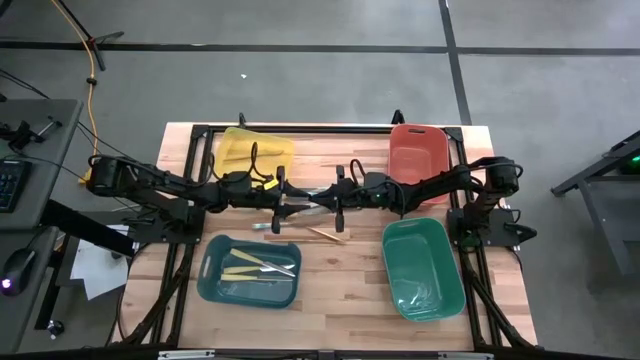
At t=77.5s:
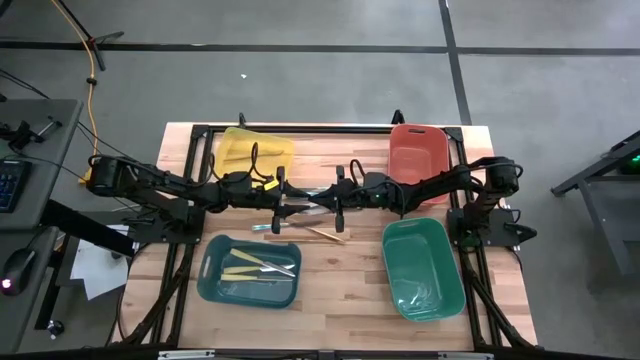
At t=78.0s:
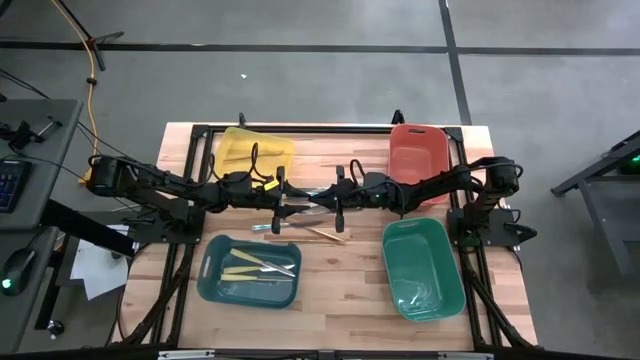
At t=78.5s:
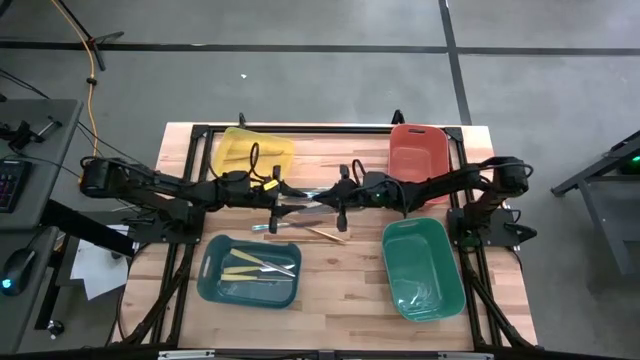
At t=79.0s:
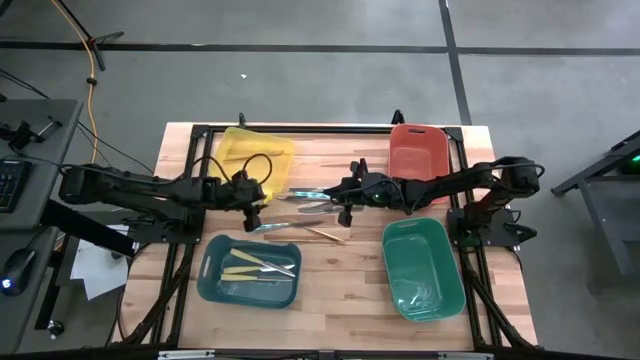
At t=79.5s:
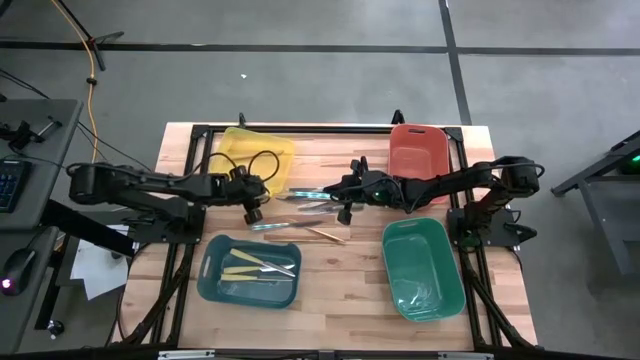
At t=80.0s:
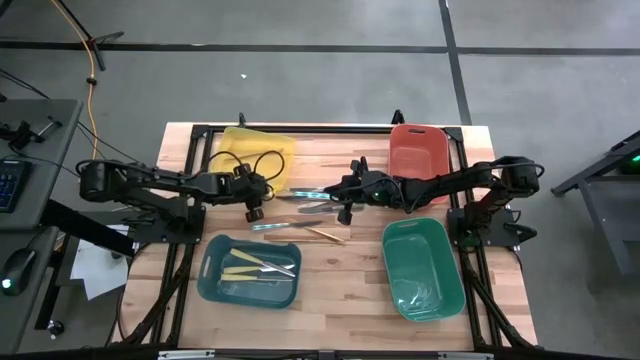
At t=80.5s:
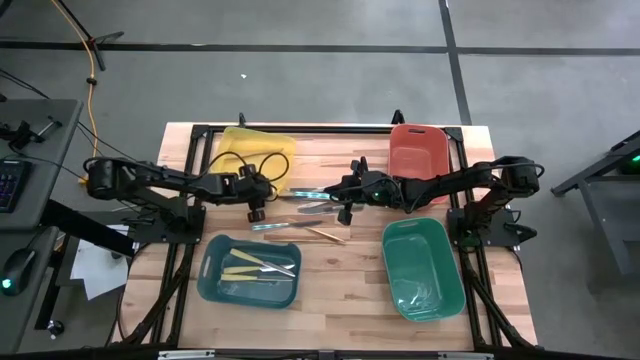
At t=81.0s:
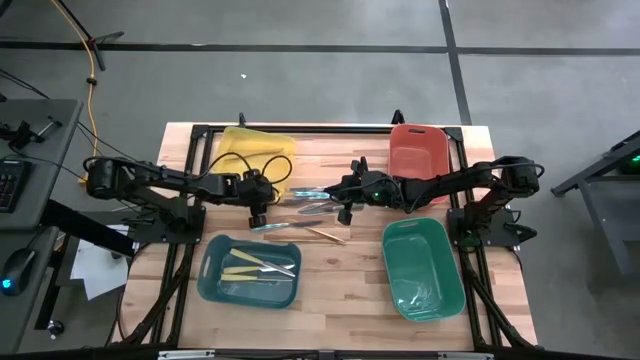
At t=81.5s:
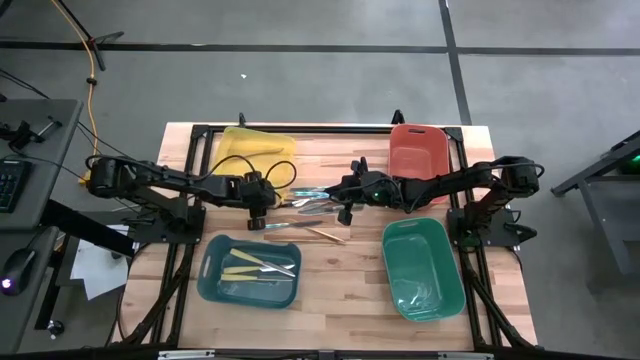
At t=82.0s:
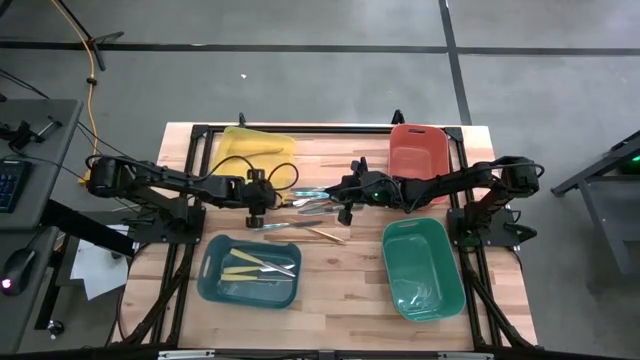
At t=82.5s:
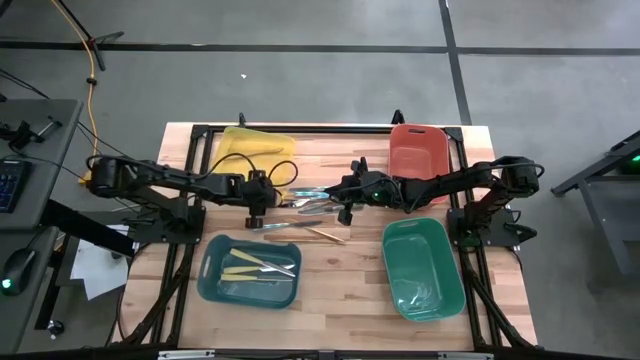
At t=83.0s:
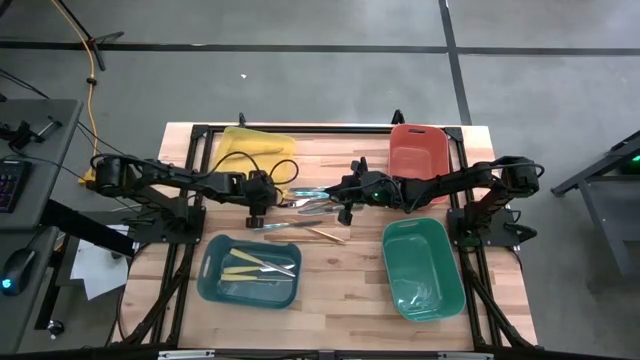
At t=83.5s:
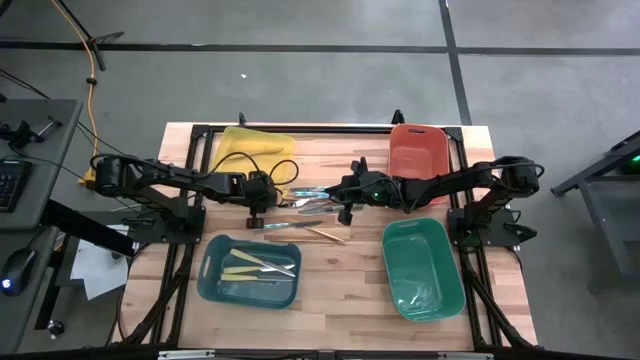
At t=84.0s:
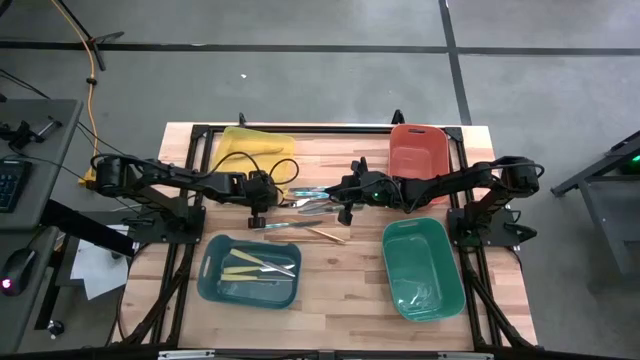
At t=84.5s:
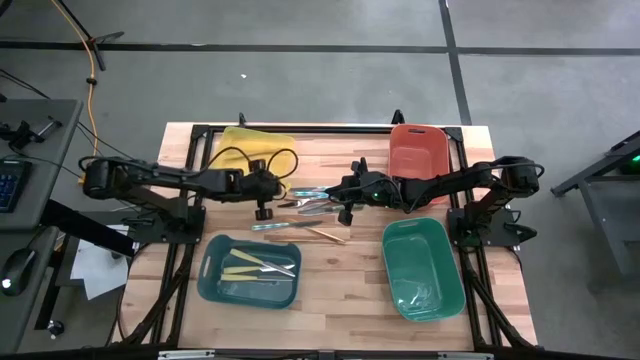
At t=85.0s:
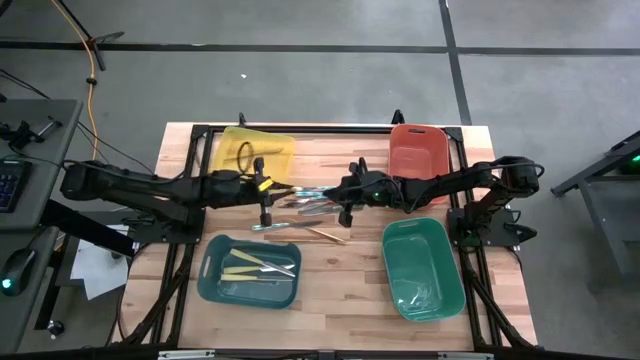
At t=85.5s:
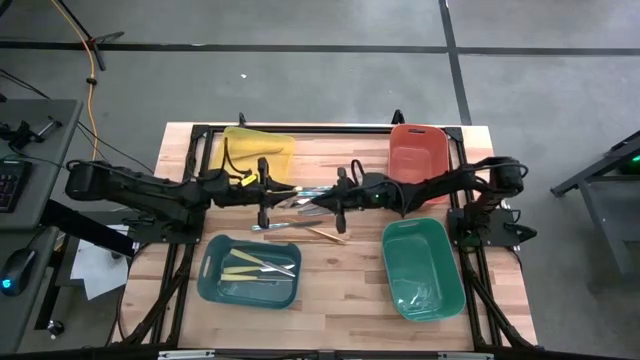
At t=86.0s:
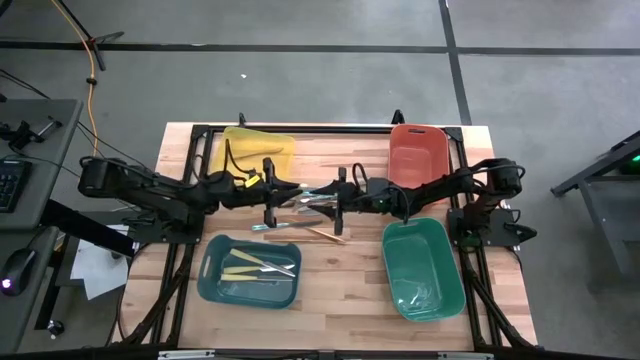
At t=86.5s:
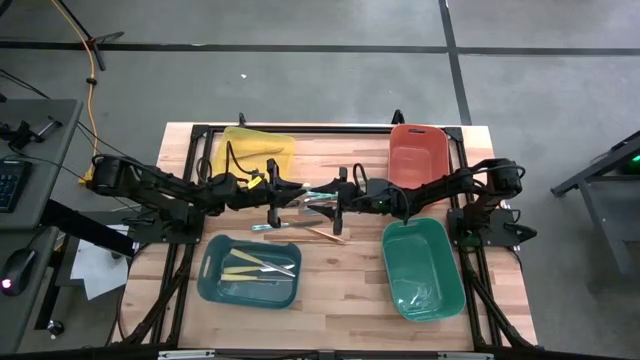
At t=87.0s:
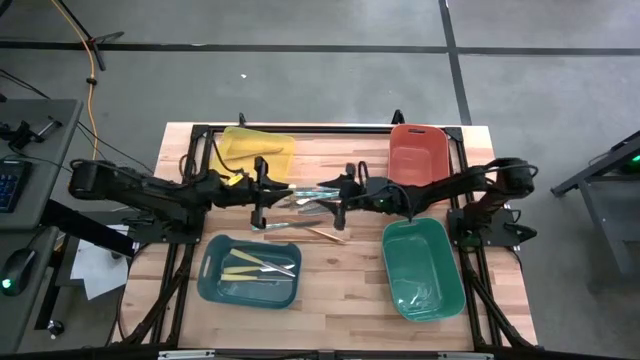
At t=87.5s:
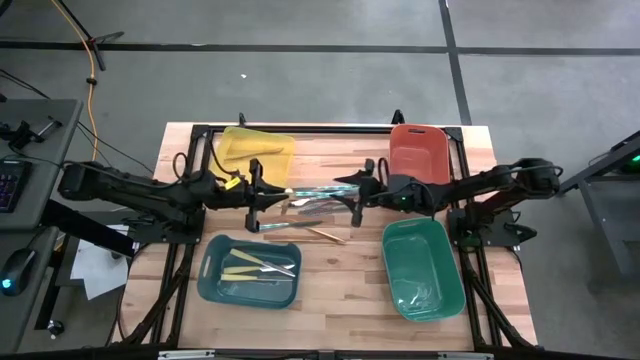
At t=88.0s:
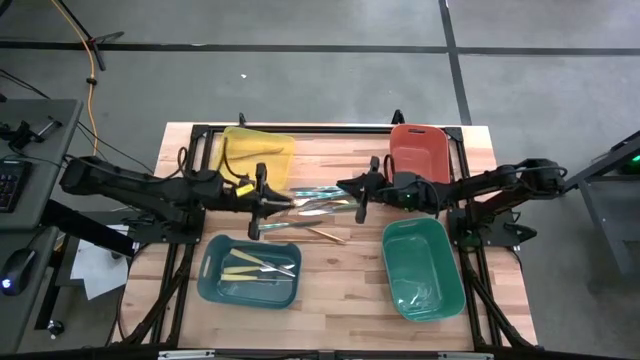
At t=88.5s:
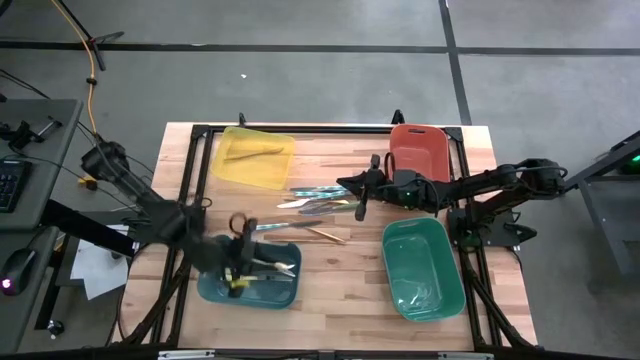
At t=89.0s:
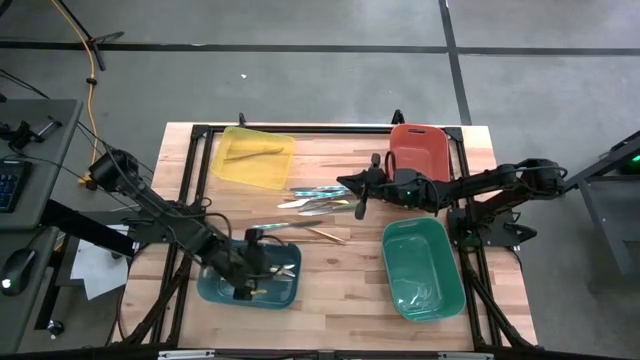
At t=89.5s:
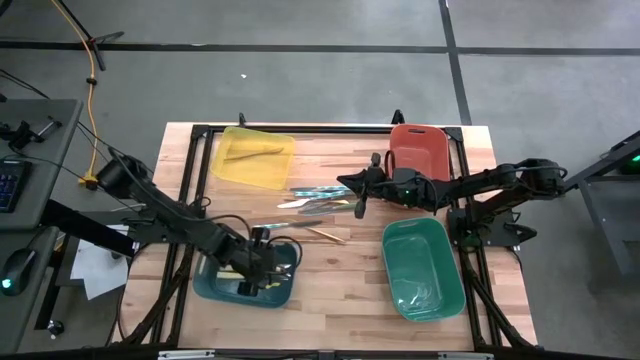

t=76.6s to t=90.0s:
Task: Sort silverware by color (type)
Put the yellow knife into the blue bin

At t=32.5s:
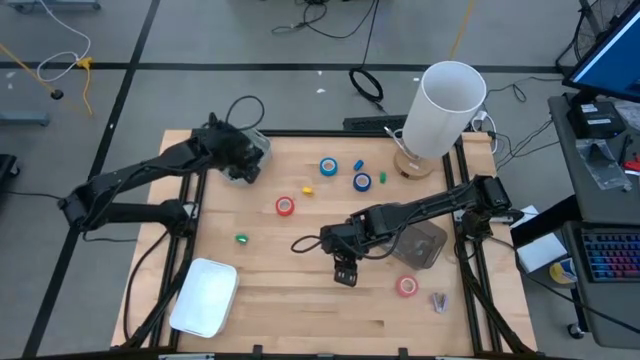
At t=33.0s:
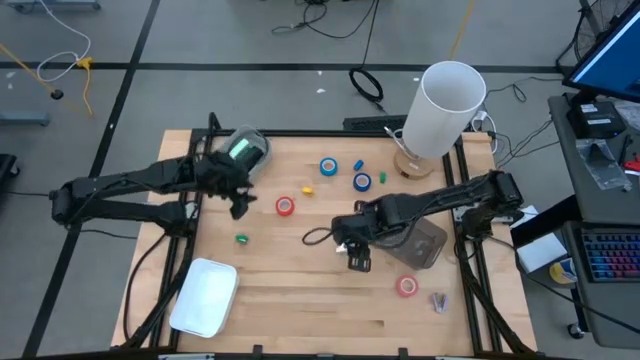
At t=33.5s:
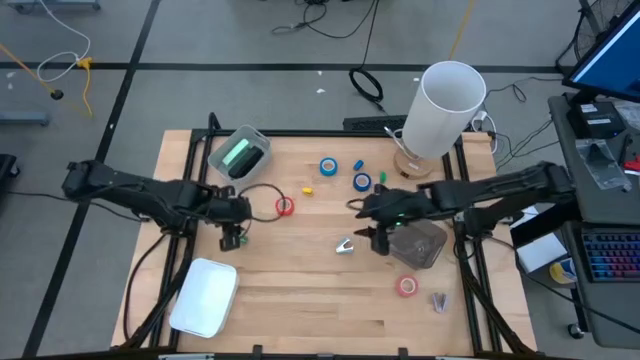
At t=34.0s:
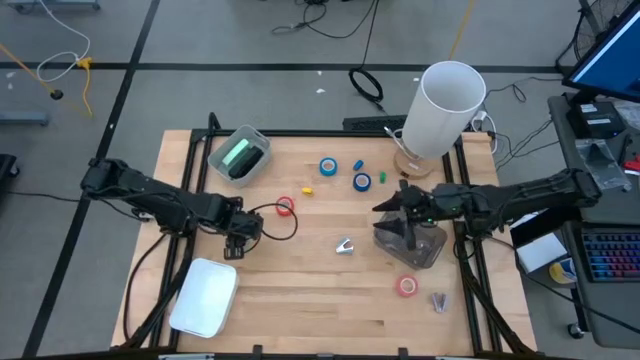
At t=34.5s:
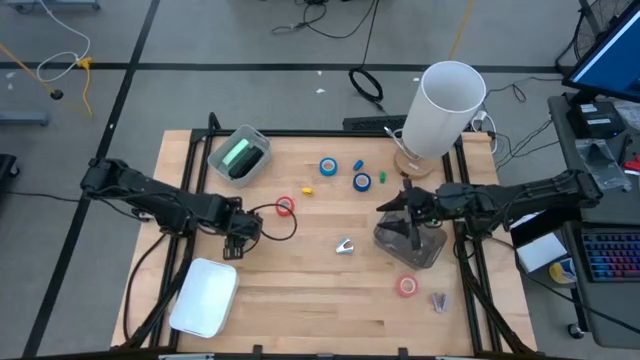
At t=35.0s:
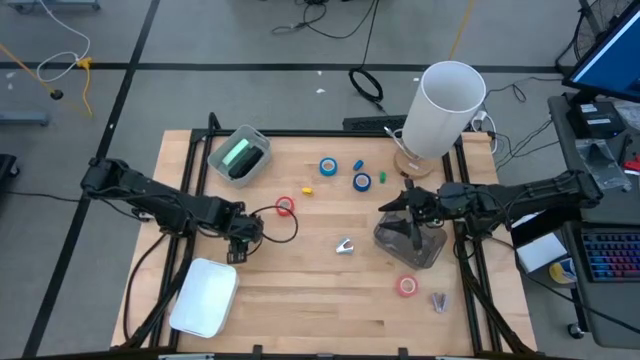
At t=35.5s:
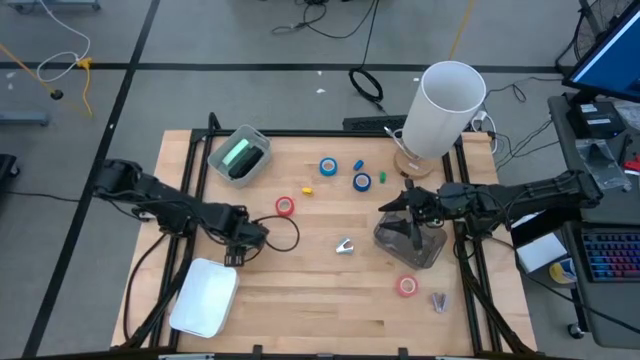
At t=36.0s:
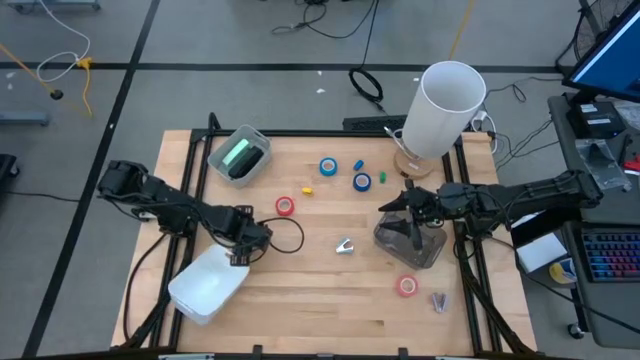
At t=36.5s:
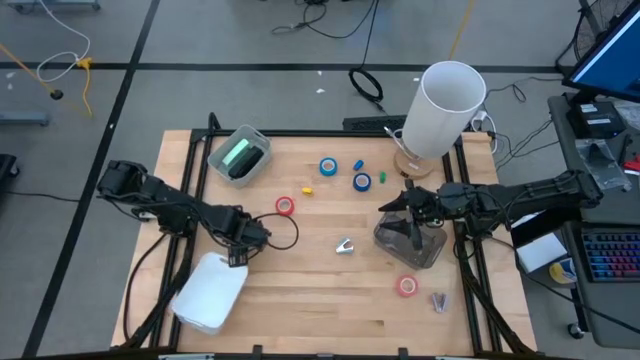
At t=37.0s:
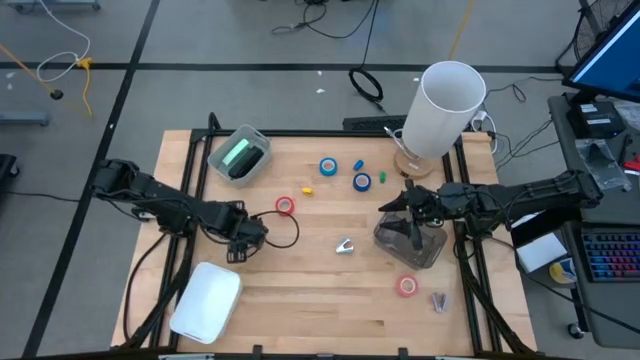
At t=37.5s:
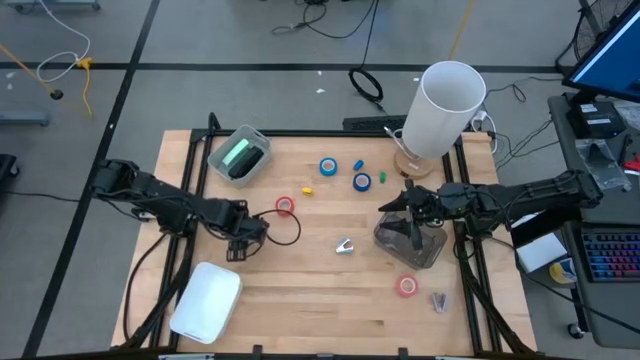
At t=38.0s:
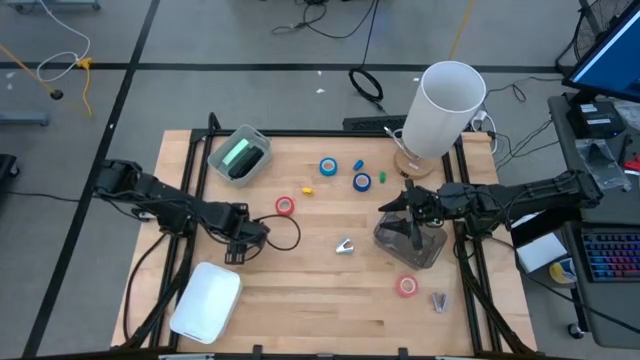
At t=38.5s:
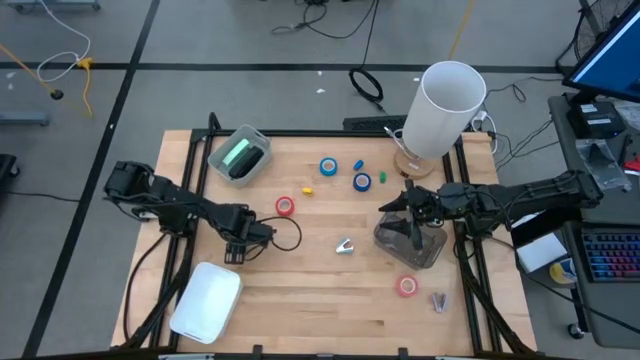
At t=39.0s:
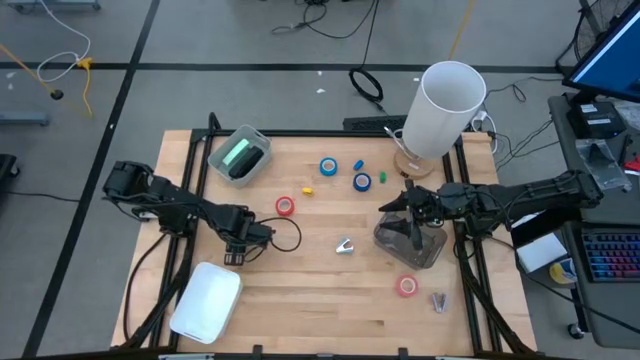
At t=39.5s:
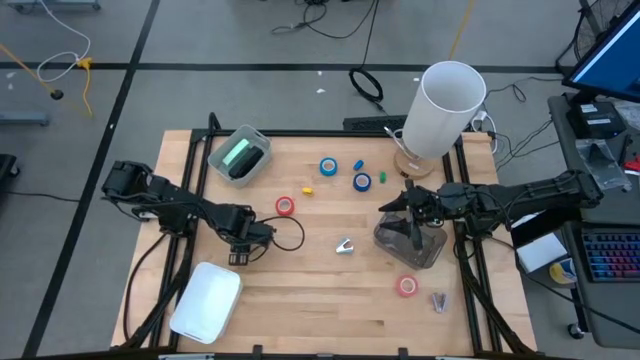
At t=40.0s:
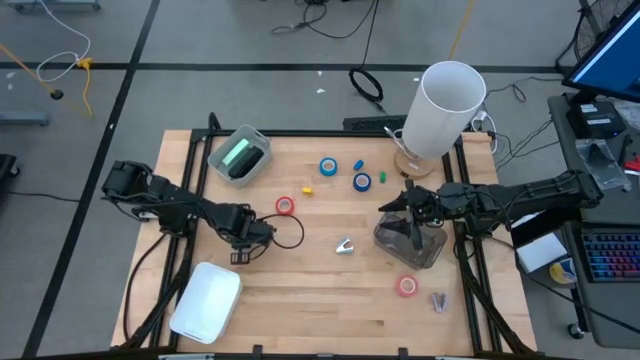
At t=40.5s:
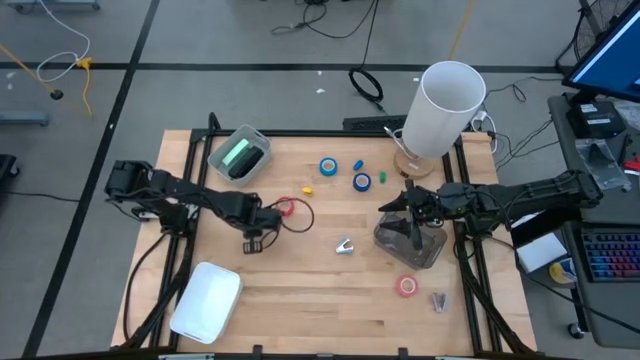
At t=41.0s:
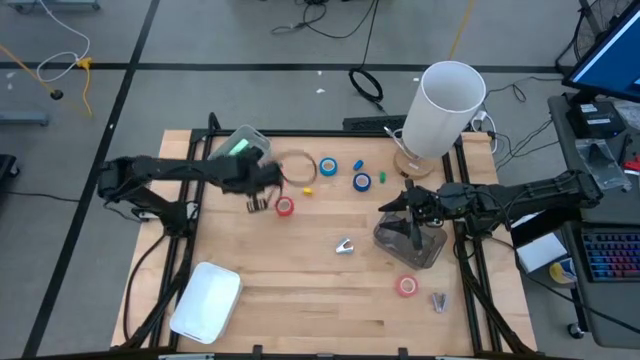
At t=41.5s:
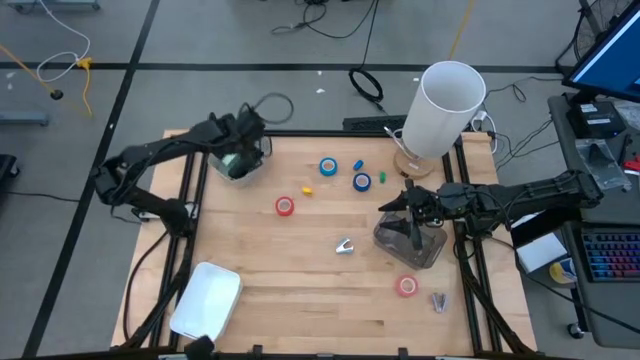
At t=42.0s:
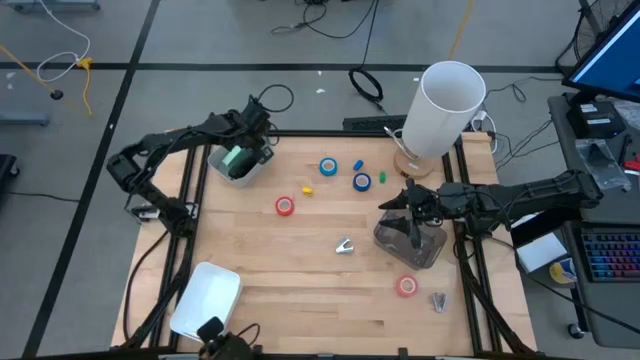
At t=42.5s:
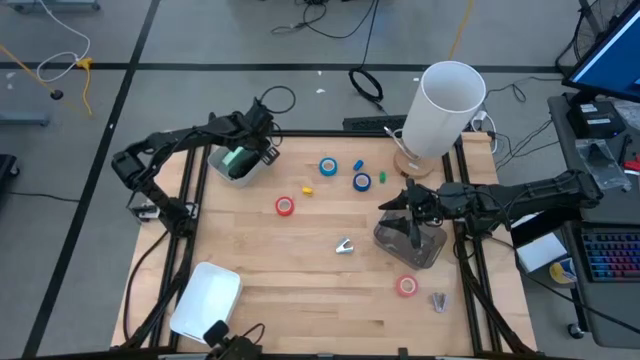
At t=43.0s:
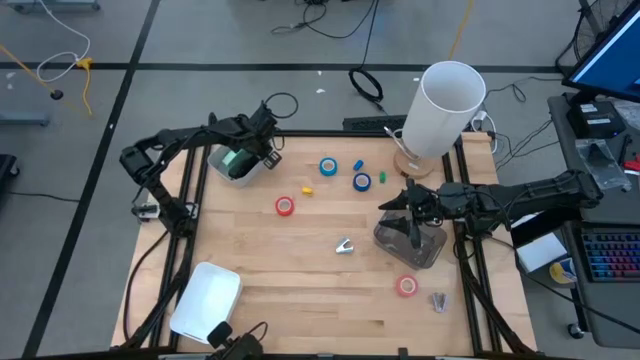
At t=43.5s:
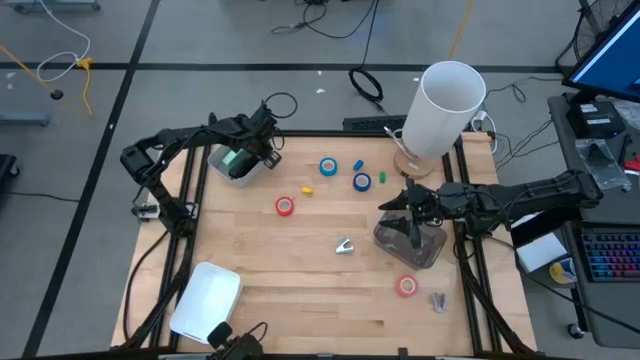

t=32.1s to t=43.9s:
Task: Pick and place Stapler, Stapler remover, tape
Put the bottom small green stapler into the gray bin
